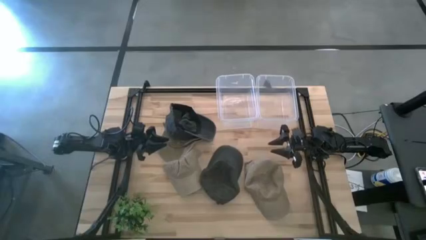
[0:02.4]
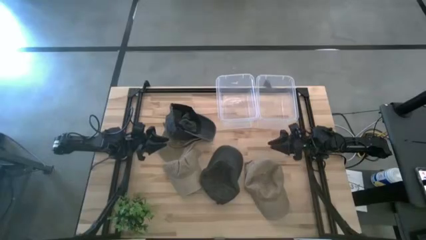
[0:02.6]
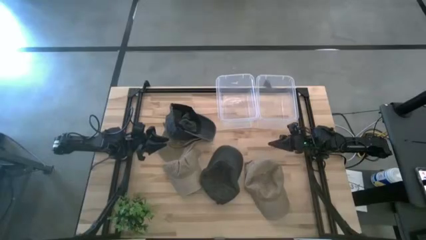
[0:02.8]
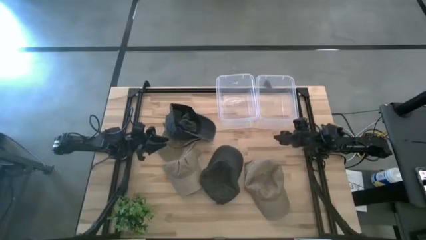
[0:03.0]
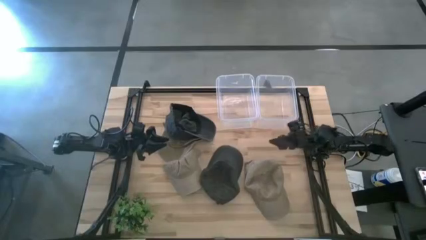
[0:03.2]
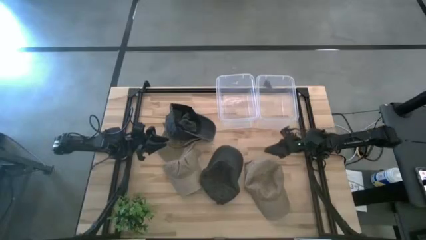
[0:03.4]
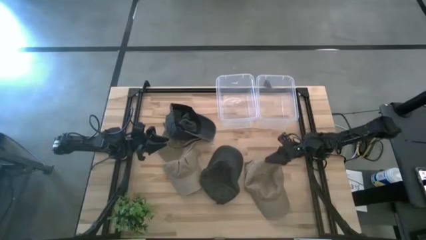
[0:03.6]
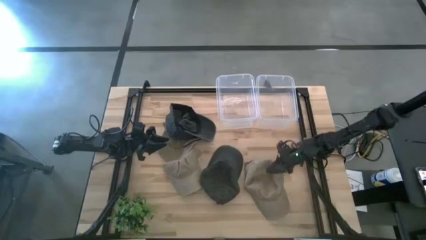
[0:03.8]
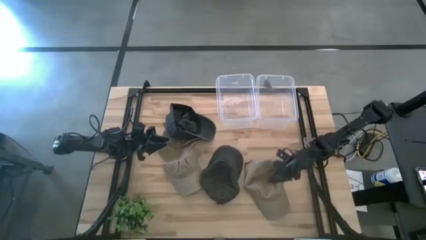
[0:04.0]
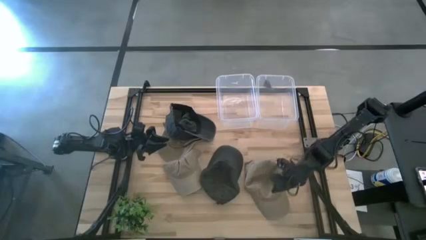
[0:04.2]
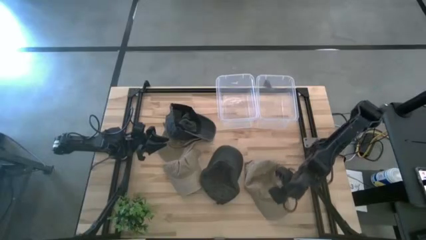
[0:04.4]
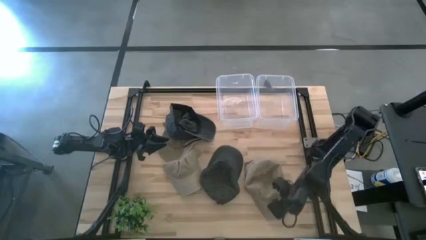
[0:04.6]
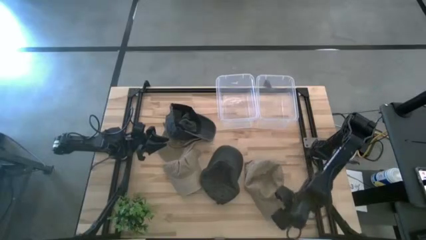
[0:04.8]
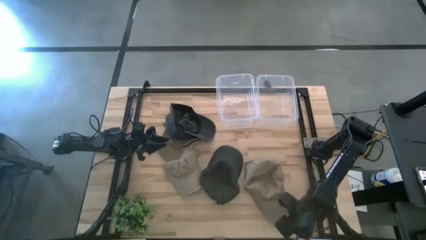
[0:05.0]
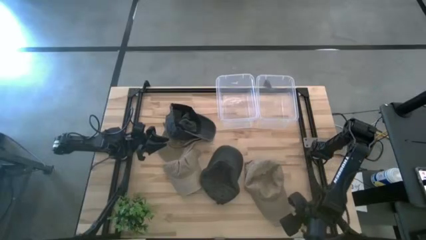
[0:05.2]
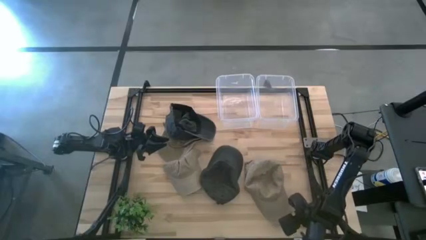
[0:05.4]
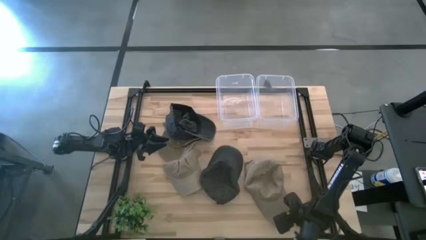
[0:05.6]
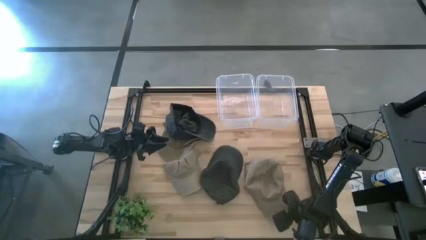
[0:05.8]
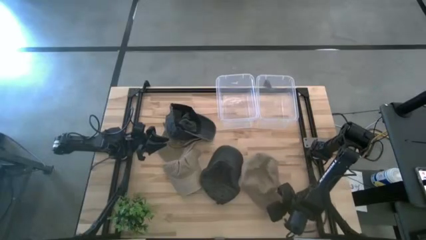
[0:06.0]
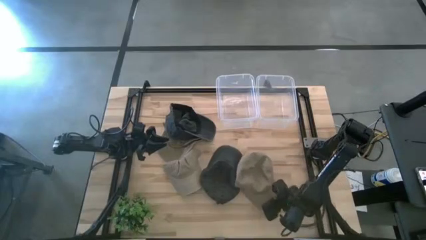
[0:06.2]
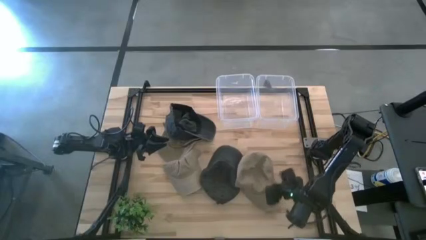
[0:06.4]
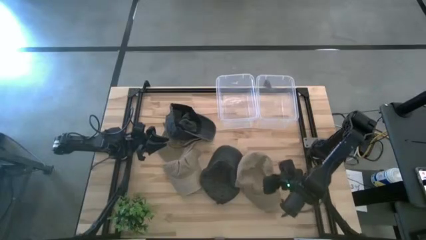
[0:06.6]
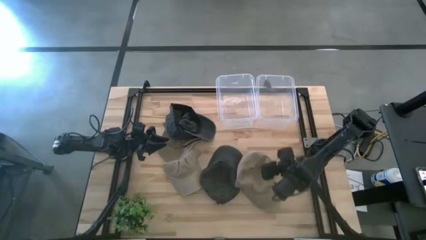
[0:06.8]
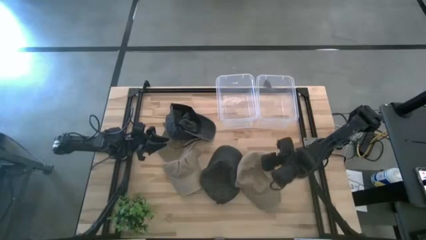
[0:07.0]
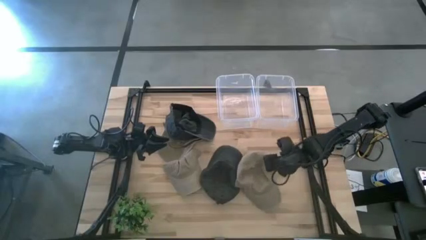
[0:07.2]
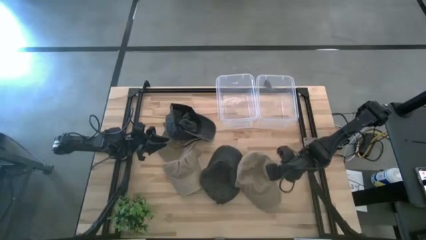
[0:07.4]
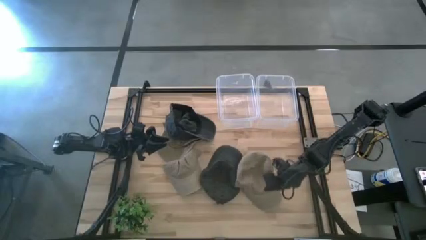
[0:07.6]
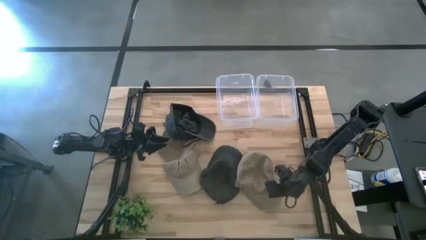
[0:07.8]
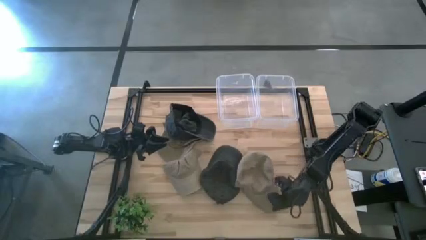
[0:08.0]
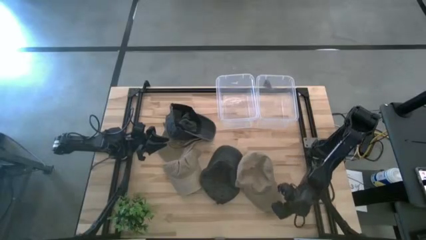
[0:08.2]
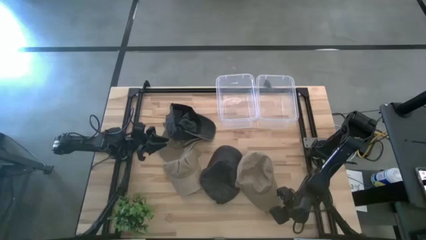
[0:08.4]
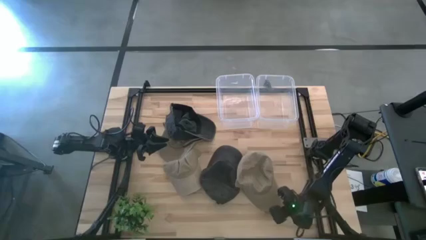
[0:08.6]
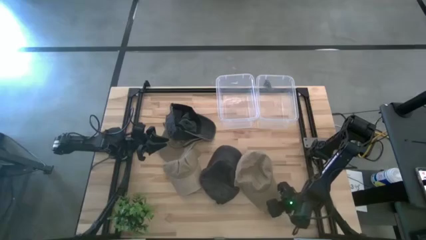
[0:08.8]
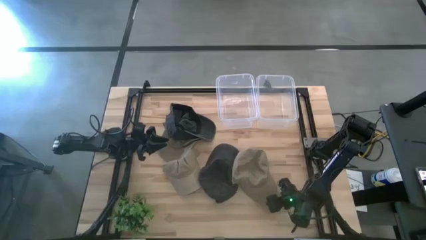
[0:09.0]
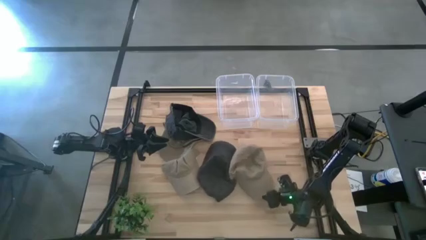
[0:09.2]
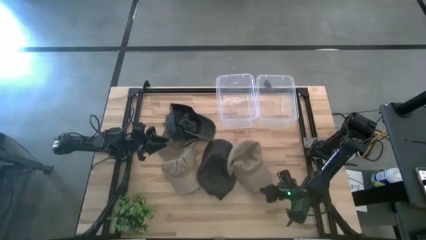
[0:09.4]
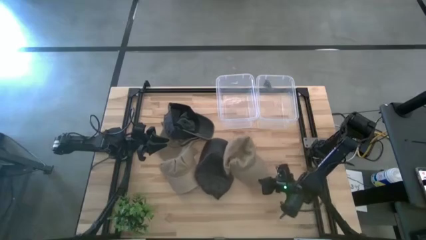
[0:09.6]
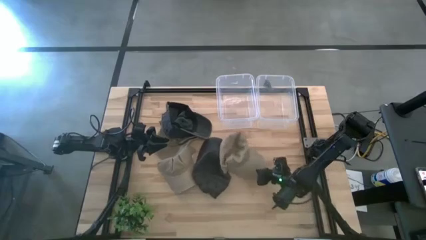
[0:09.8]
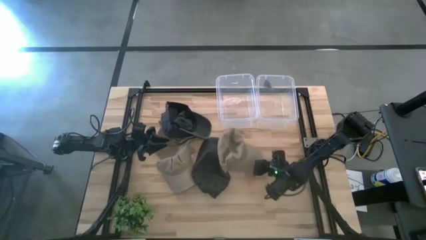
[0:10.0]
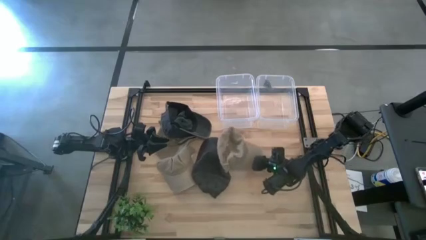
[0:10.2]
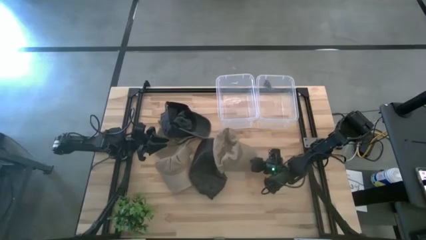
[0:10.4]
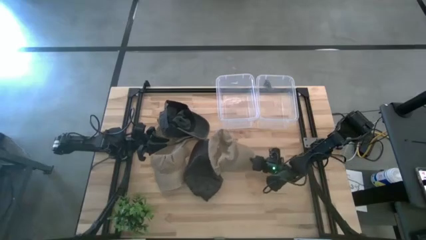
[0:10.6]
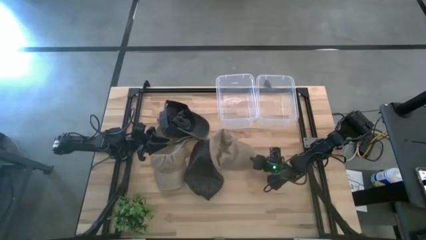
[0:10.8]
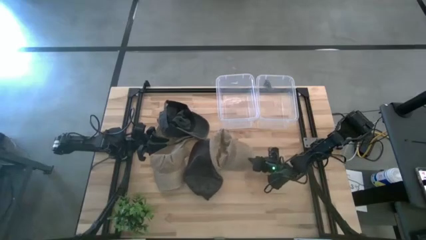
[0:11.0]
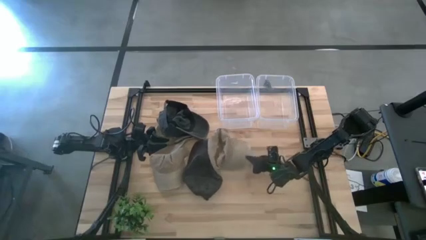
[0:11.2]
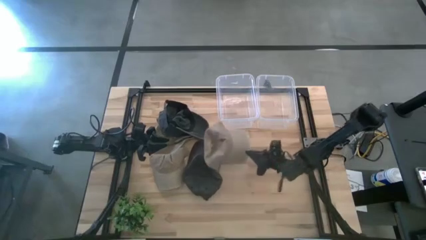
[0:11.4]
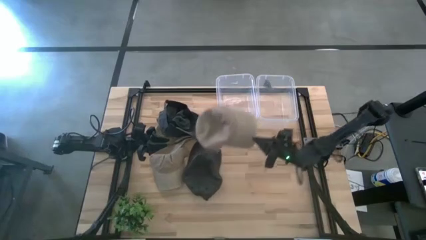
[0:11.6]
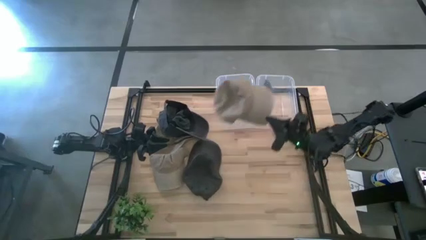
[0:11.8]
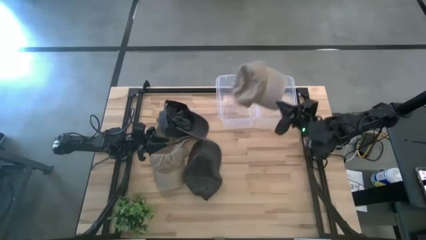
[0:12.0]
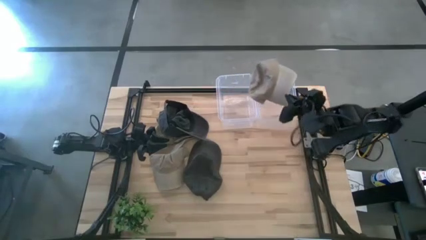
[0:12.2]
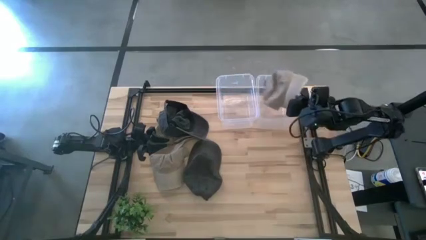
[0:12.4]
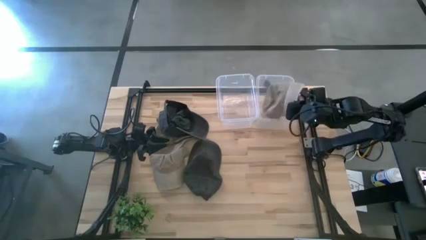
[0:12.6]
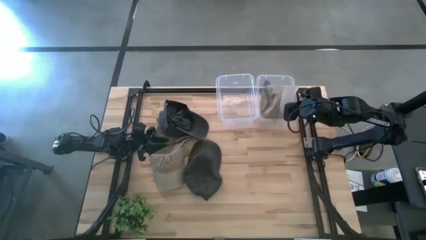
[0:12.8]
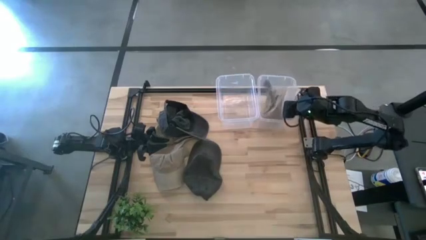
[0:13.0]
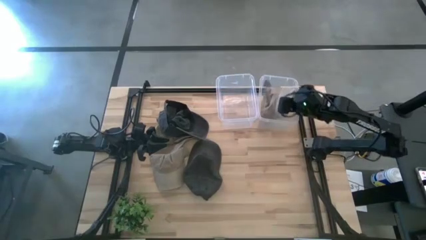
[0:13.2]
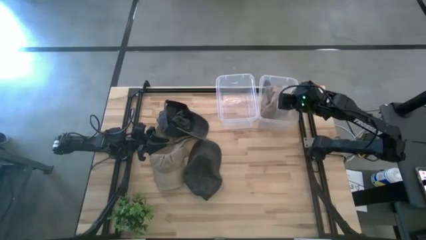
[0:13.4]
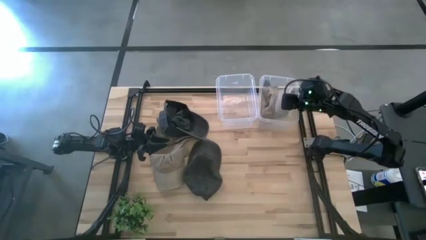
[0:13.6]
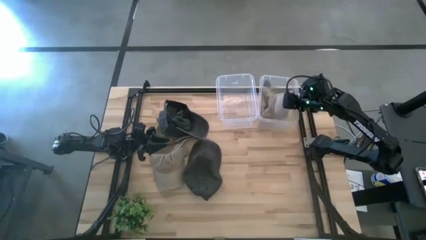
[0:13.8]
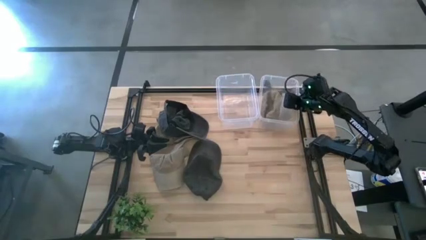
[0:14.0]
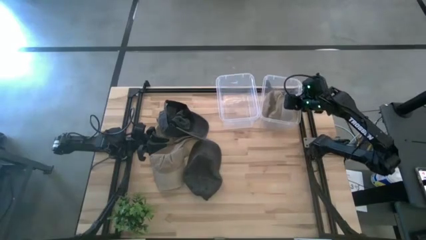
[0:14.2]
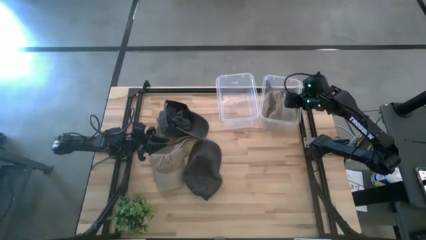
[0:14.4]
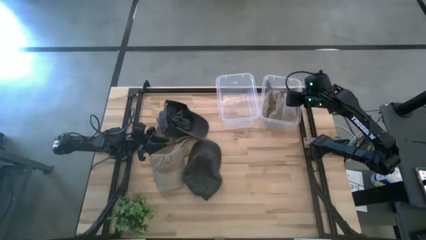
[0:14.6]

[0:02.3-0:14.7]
Task: Pick & Place hat
Put the bottom right brown cap into the right transparent bin
